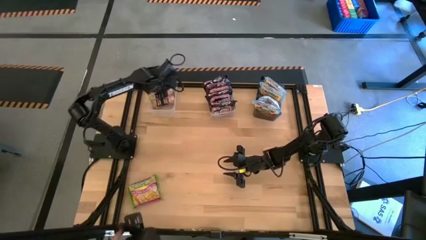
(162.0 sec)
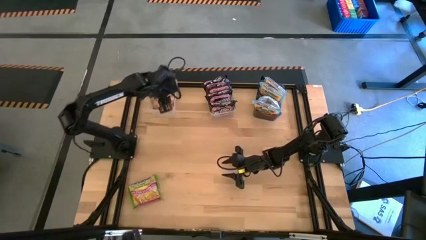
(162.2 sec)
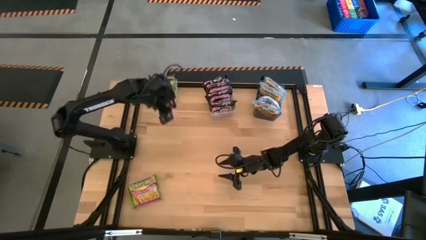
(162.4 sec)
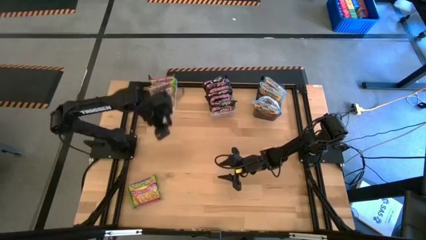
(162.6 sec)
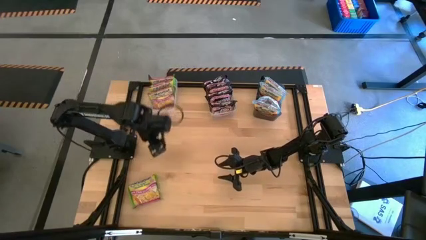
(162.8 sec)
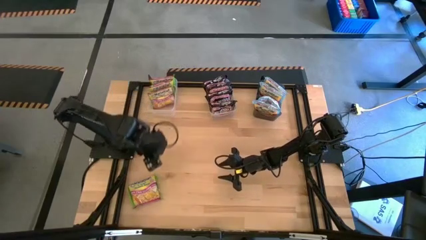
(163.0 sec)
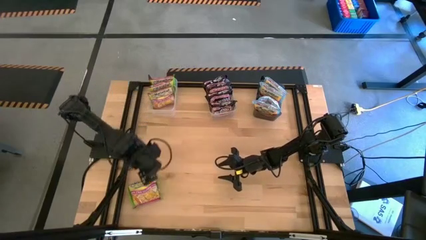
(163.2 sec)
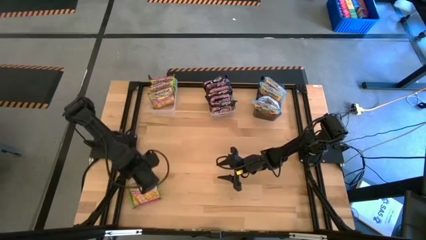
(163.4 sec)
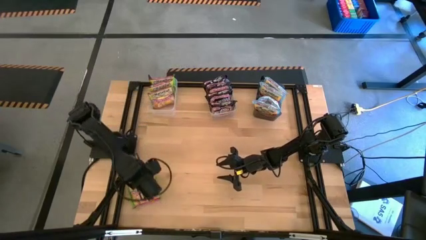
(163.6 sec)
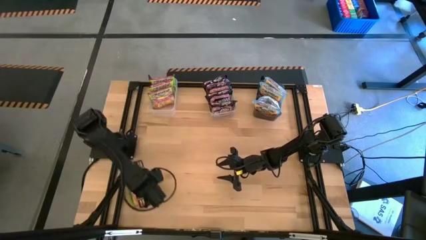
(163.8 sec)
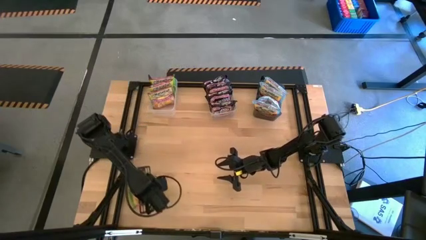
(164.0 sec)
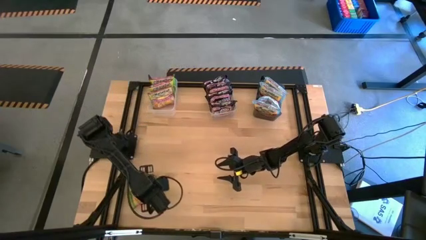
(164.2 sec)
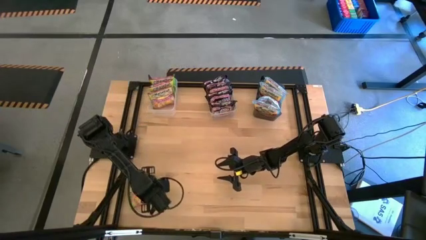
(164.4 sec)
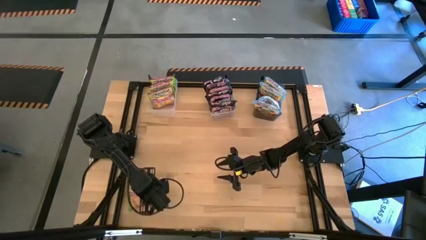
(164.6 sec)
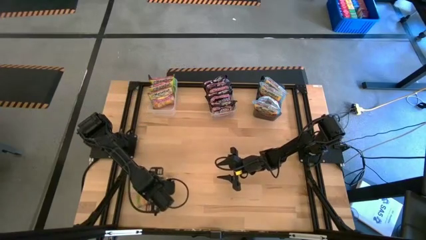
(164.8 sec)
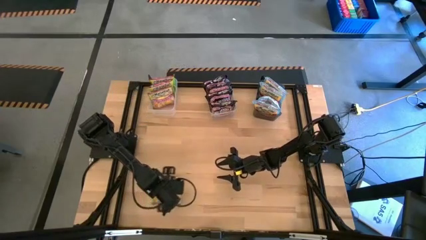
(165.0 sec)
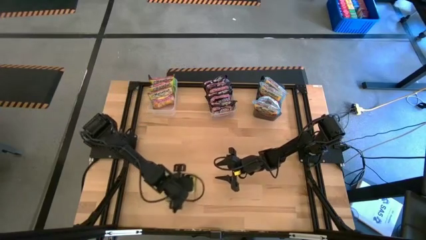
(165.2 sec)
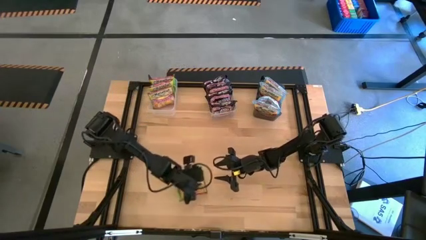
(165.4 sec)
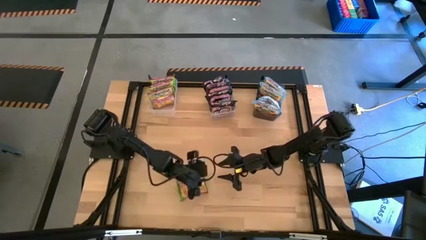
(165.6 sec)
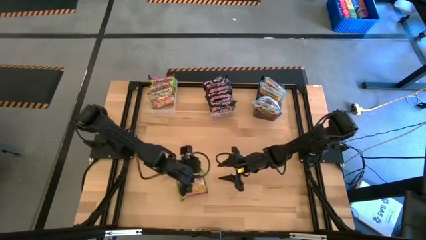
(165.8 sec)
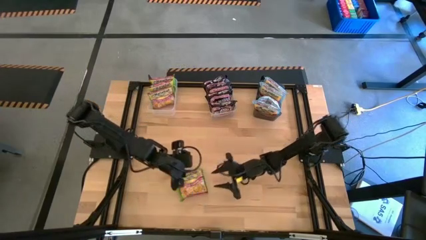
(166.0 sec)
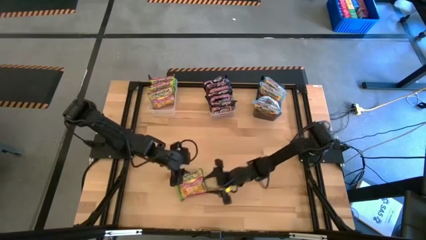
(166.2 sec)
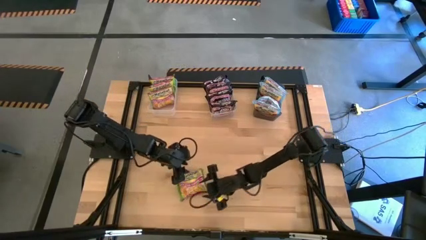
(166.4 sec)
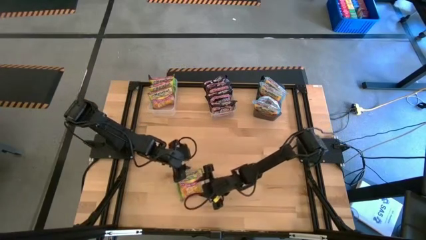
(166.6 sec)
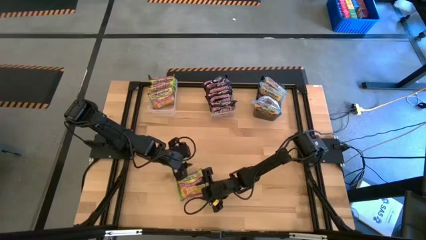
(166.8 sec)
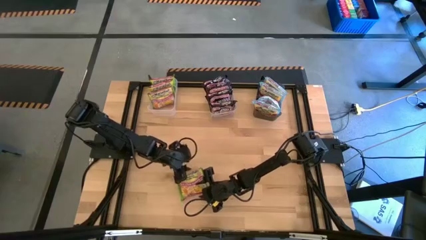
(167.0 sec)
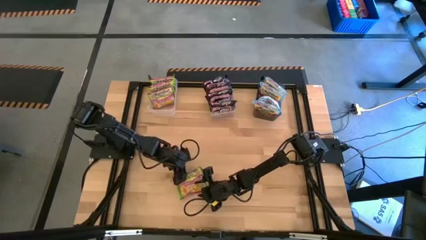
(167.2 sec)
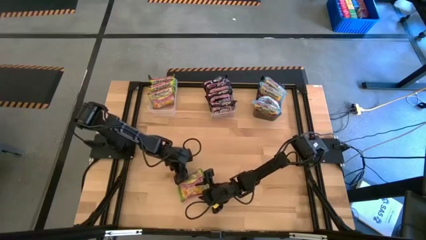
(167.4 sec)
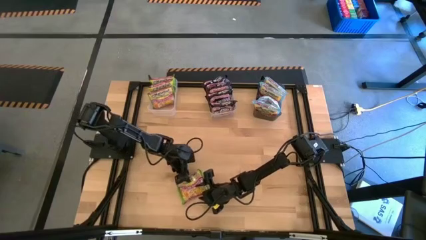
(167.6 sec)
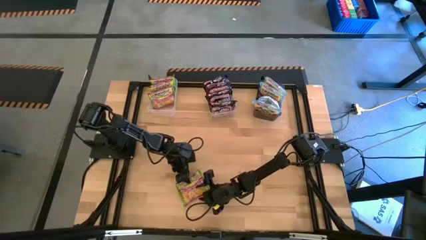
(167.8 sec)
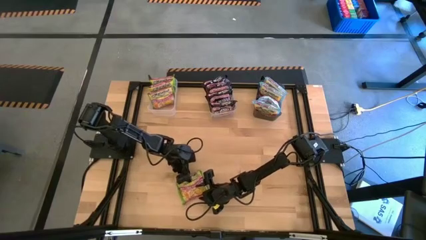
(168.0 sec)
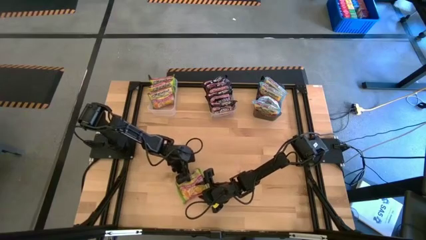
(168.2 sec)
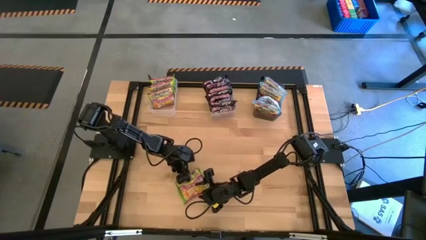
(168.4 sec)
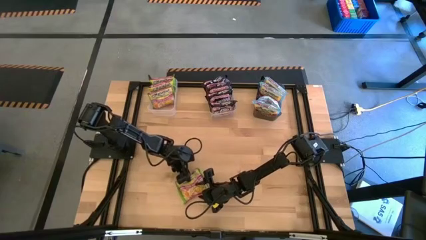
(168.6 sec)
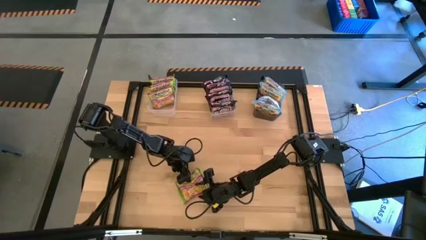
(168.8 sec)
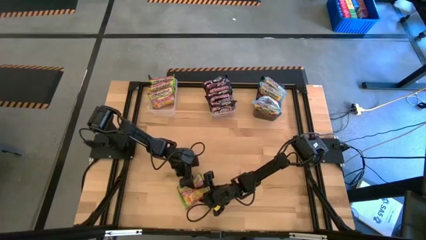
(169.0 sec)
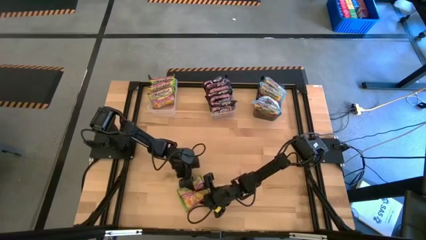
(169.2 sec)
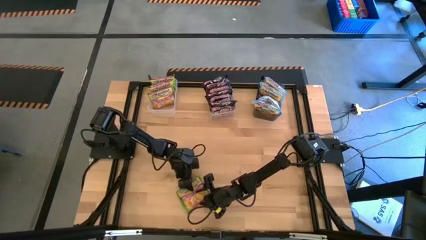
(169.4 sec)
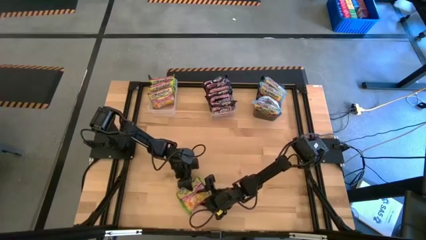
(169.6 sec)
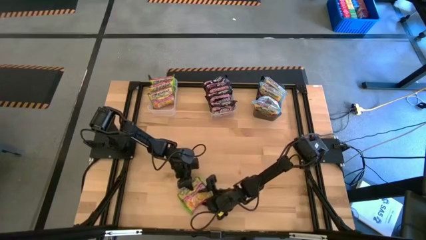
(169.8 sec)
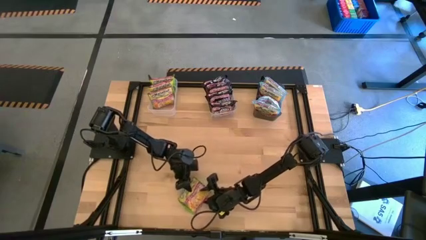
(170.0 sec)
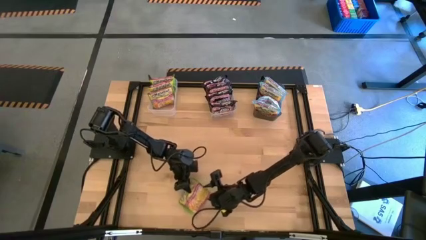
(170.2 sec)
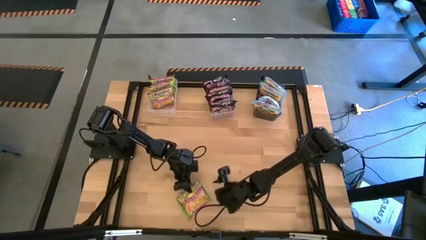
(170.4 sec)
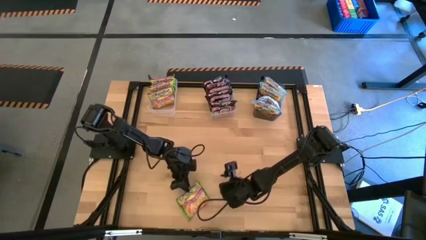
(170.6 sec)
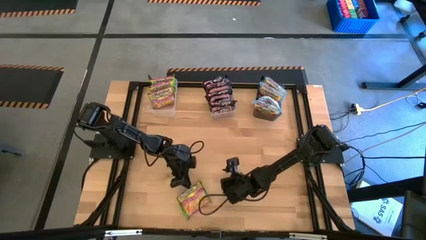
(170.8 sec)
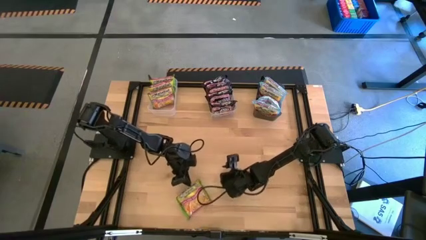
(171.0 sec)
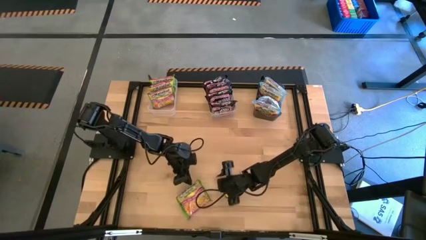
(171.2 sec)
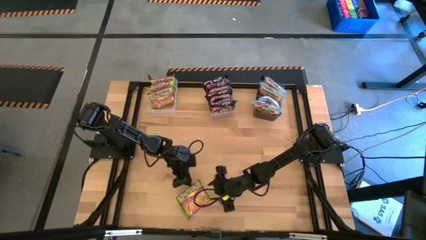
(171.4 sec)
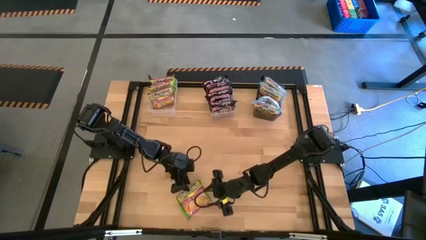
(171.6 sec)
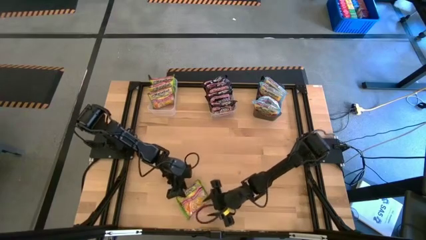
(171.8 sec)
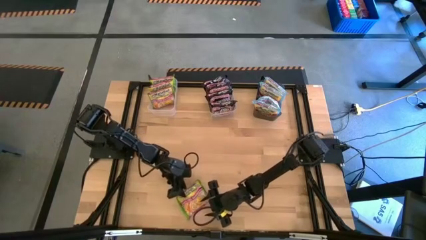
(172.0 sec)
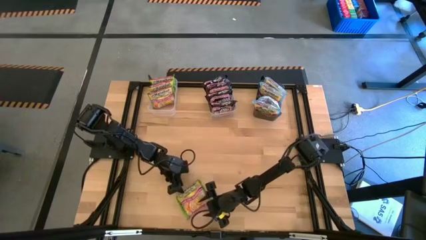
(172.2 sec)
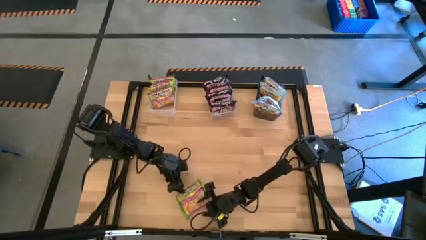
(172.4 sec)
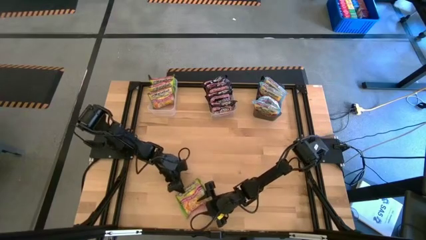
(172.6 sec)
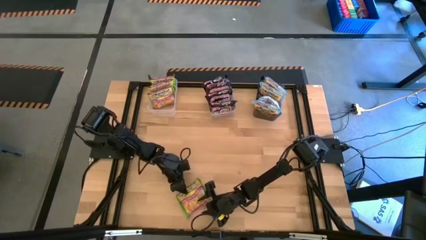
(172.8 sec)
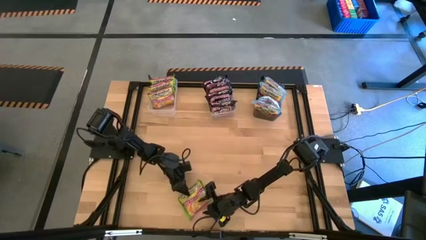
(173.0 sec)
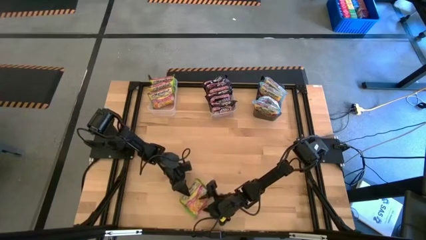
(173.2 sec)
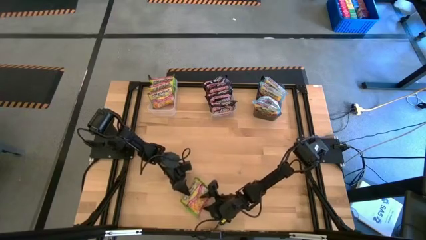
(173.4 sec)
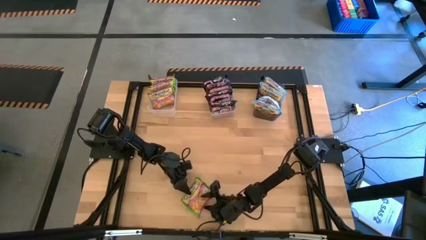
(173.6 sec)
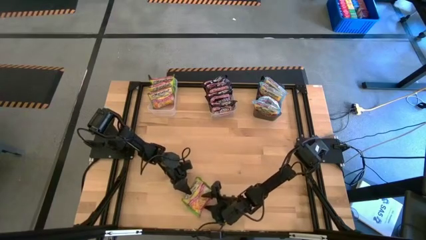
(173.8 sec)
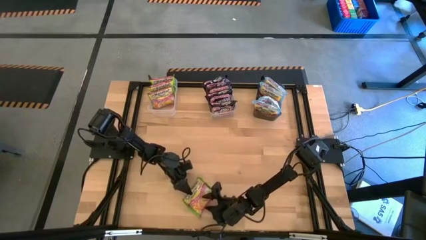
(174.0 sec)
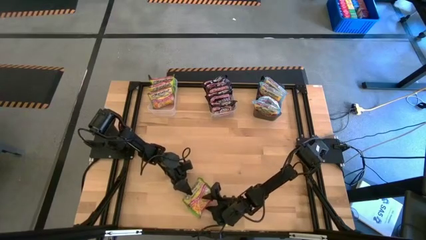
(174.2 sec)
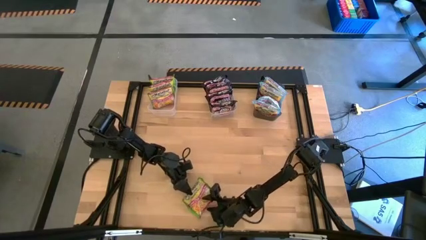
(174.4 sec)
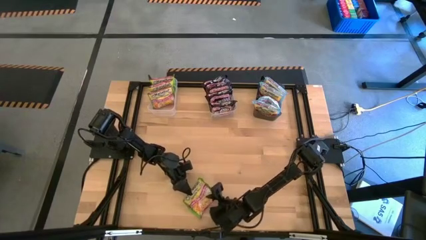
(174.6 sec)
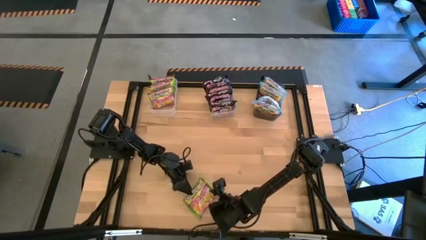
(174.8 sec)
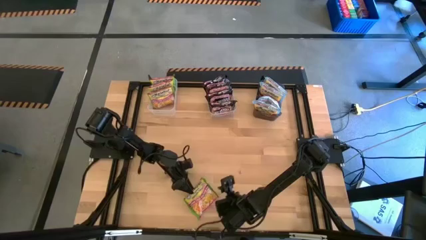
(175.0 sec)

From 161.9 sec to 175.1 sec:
Task: Sort Maruchan noodles
Put the green noodle pack into the left transparent bin
